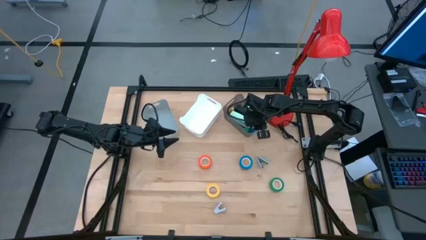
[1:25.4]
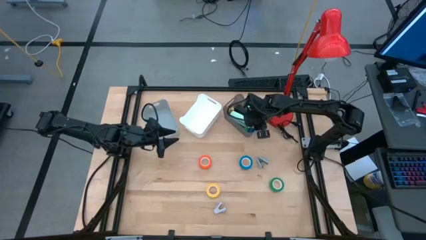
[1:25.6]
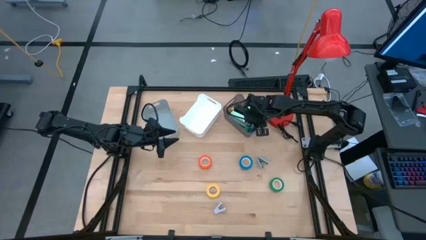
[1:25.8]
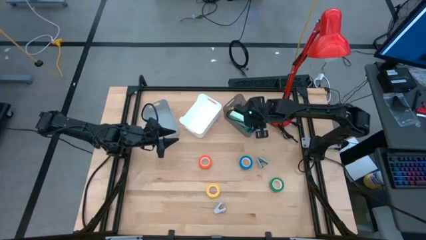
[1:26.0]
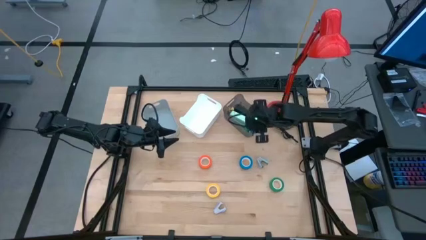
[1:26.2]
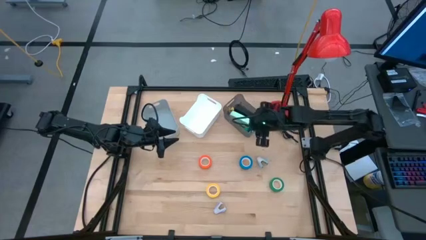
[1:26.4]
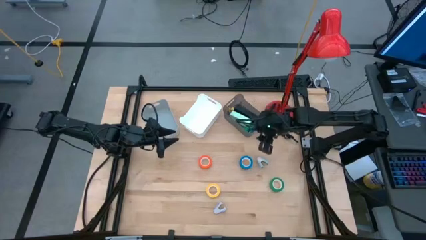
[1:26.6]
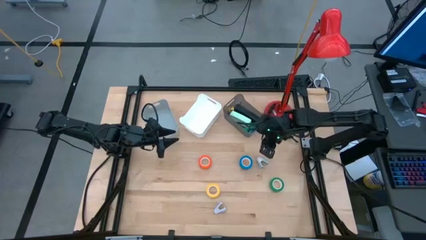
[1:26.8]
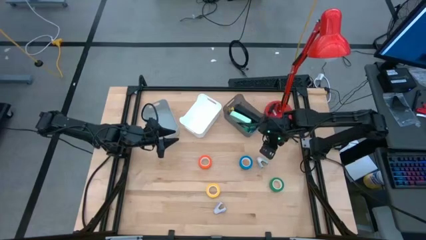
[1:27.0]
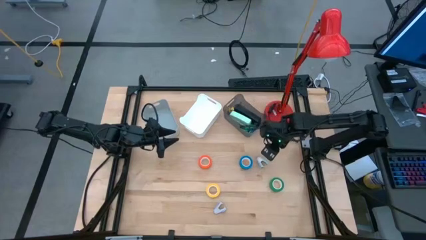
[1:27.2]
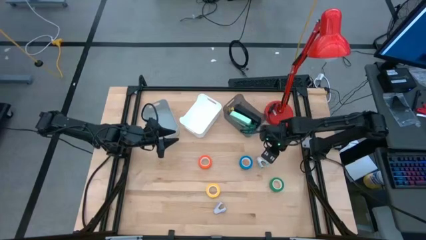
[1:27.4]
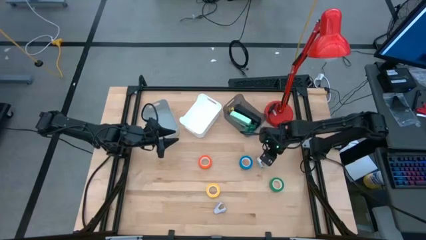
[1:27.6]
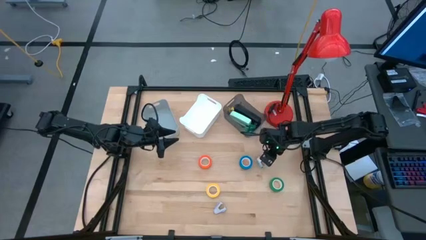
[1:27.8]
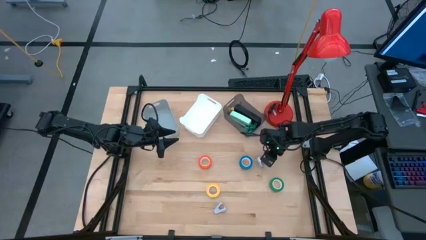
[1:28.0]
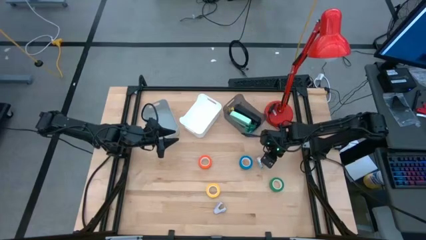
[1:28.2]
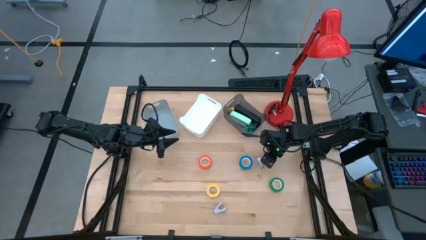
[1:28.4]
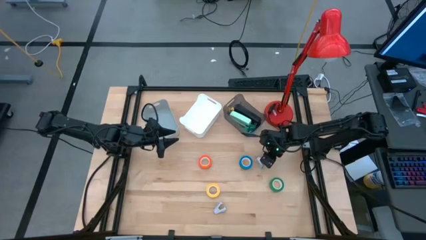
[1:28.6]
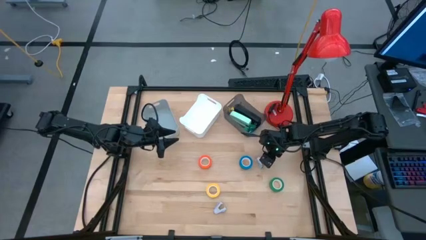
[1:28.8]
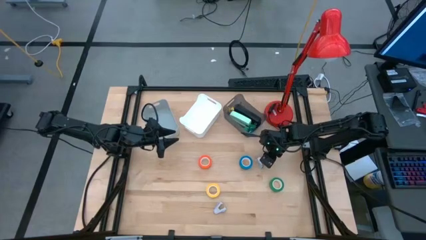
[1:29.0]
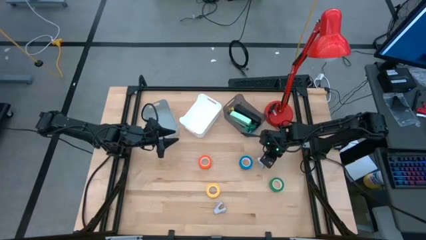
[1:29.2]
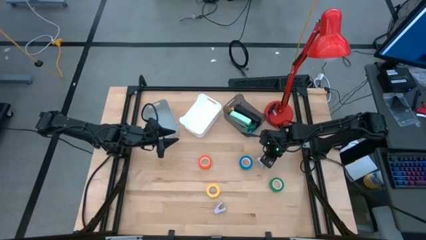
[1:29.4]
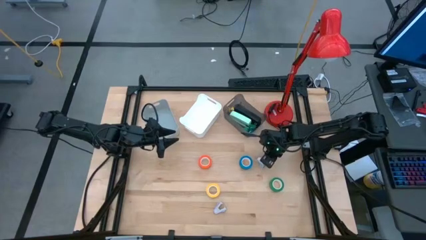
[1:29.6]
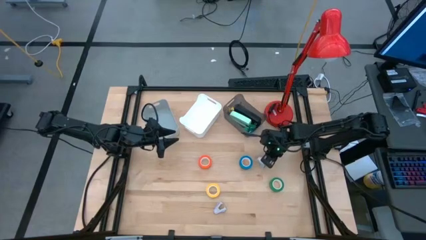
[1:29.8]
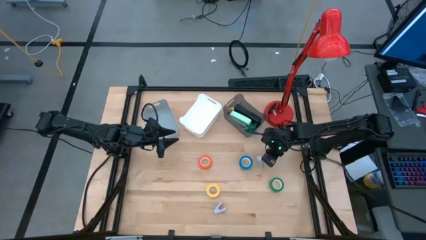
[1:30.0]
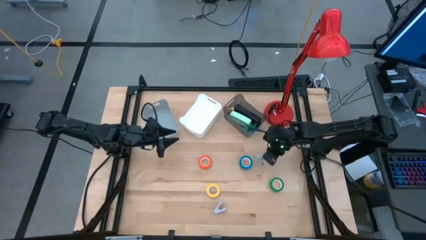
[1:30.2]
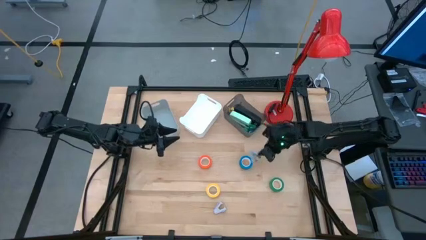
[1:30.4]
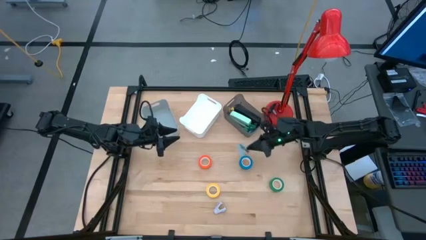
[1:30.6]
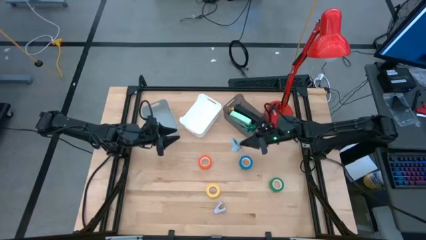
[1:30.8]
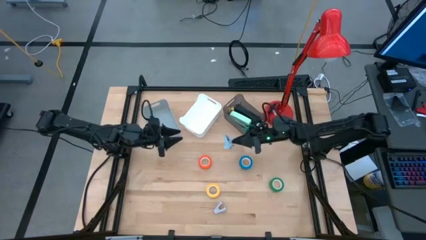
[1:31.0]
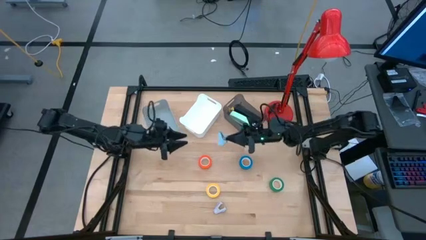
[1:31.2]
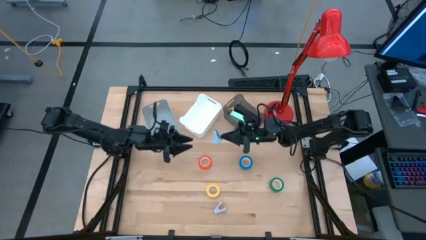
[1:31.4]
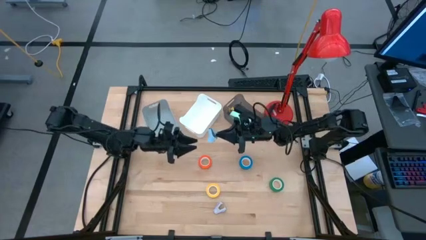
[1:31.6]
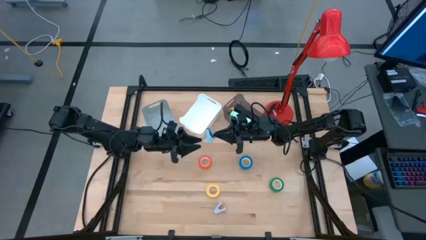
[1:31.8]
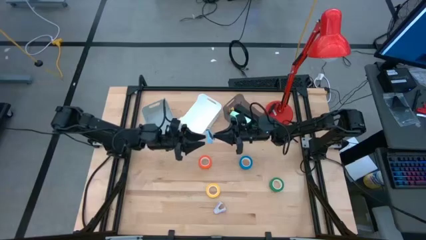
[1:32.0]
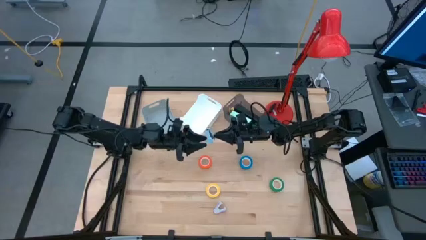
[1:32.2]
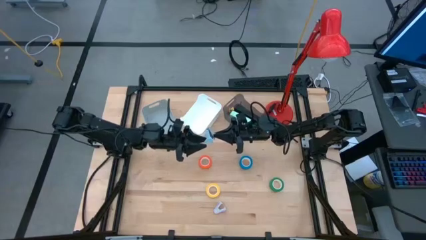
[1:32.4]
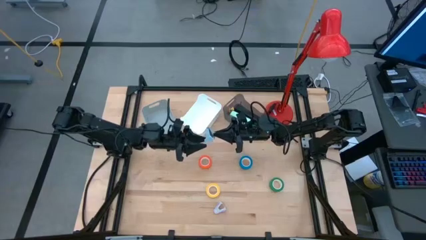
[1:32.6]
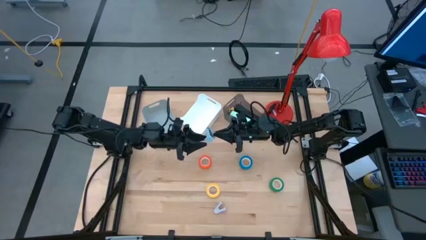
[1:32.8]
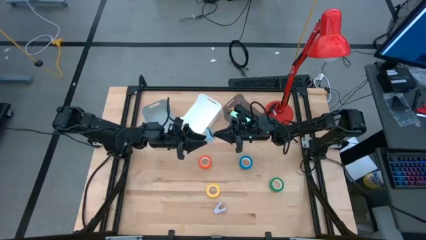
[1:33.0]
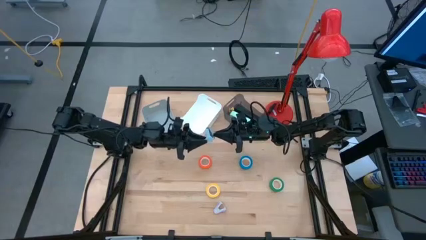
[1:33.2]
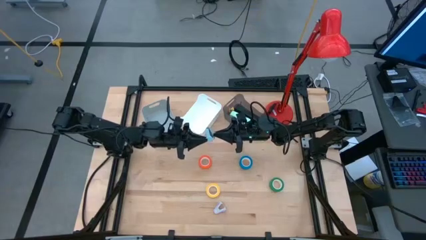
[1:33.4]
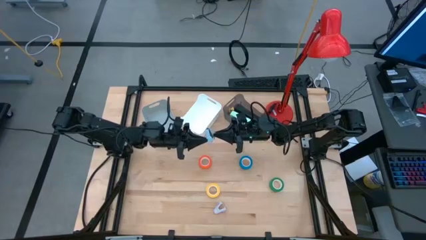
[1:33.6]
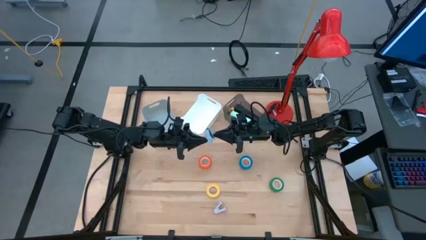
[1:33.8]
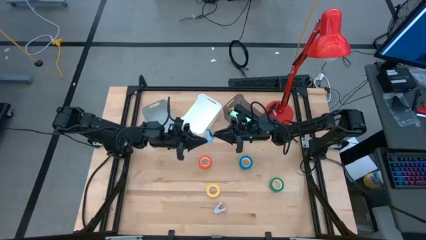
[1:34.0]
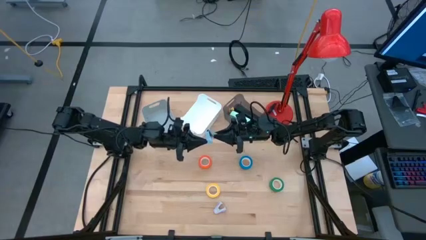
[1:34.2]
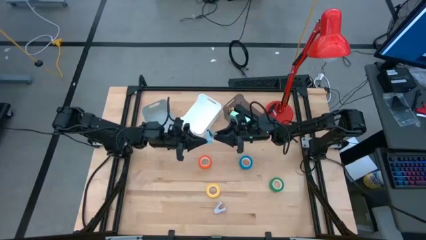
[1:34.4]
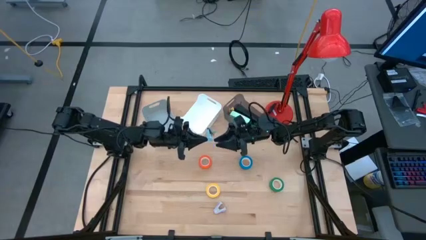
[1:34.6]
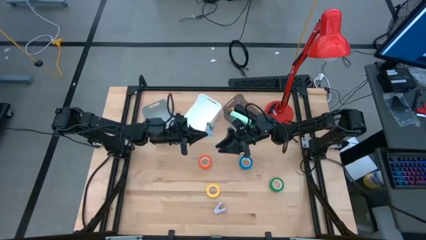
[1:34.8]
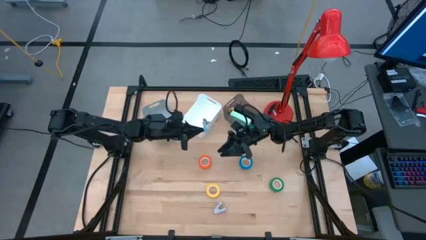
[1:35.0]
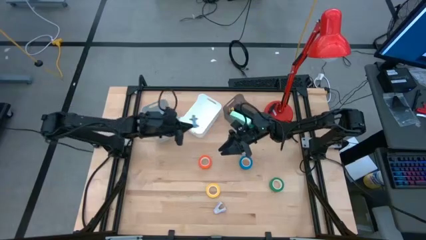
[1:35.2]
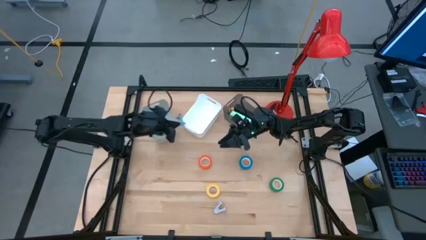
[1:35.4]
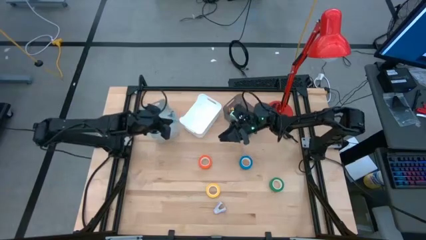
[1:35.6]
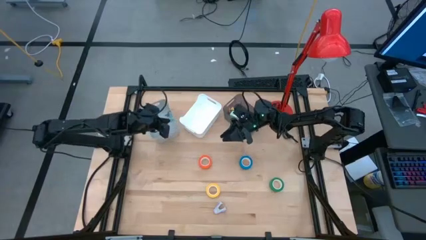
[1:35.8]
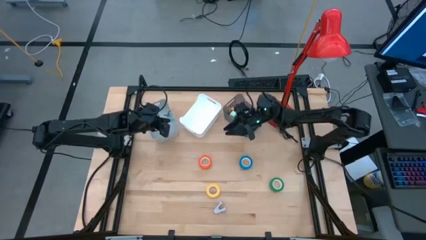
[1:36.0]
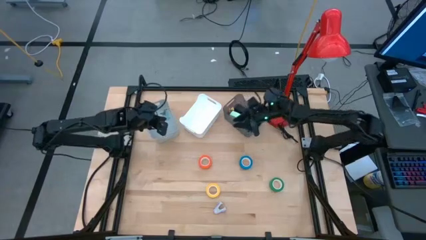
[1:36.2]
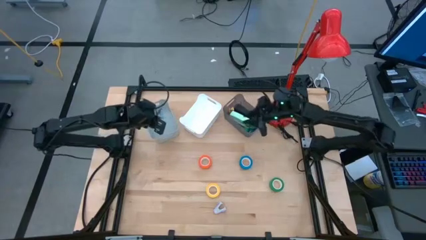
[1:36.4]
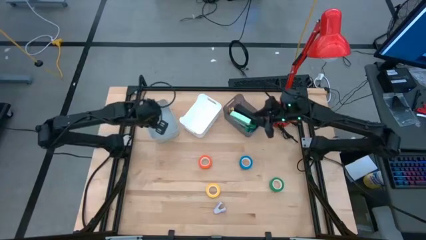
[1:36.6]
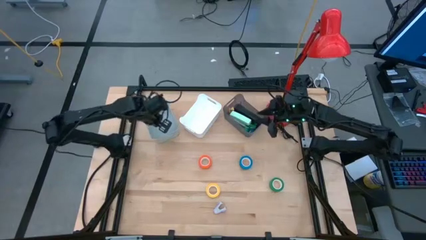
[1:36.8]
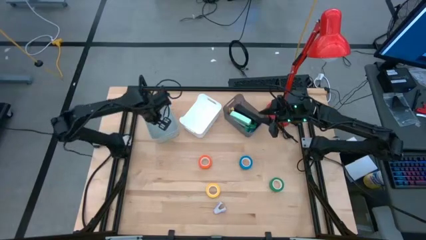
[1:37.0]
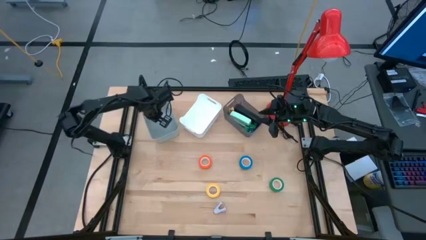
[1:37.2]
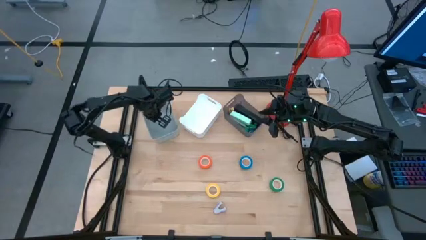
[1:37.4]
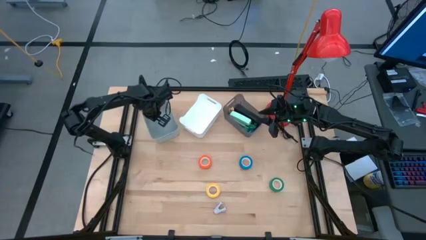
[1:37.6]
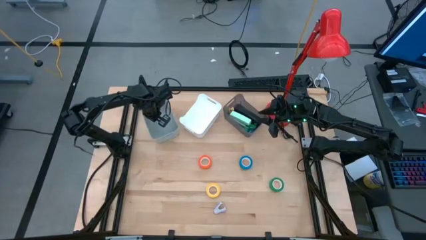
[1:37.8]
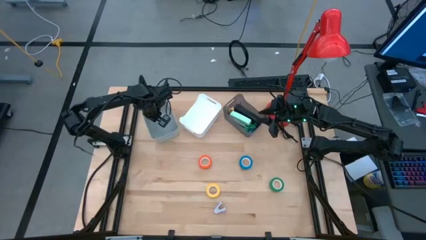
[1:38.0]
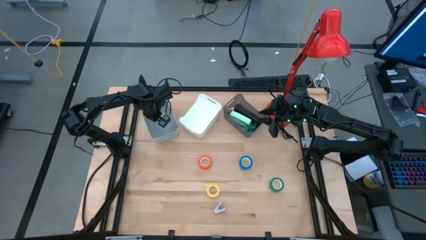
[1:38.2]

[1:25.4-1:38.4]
Task: Pick and place Stapler, Stapler remover, tape
Put the light blue staple remover into the gray bin
